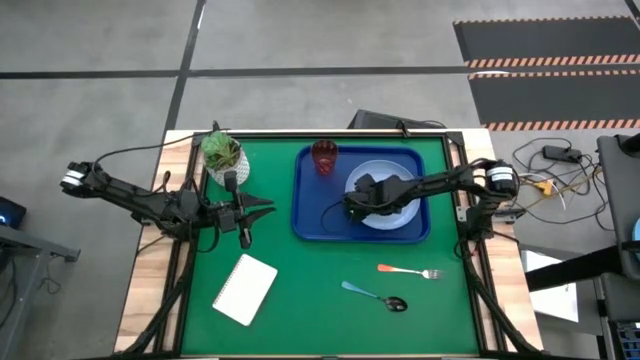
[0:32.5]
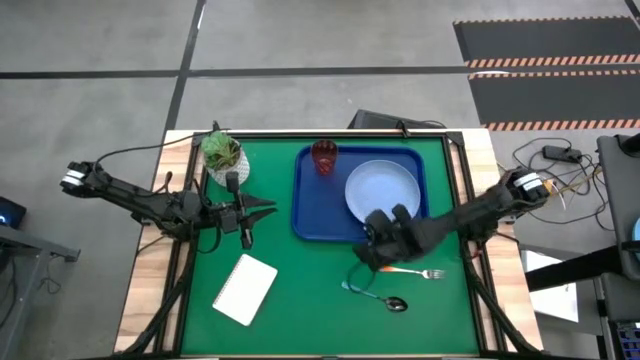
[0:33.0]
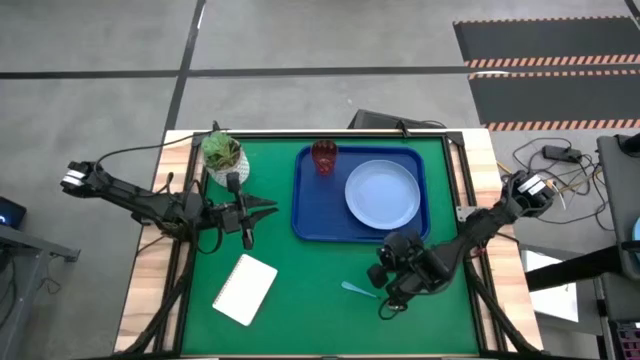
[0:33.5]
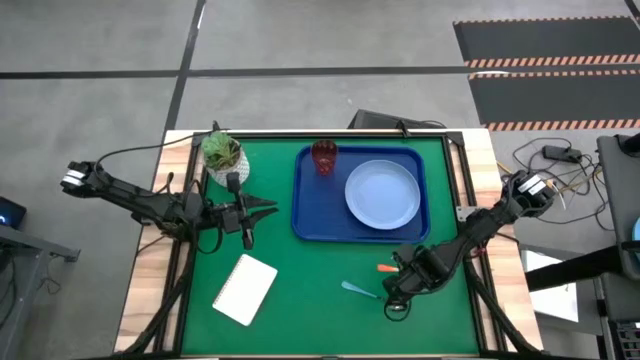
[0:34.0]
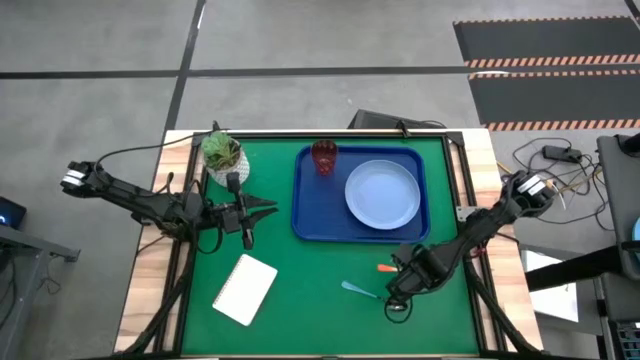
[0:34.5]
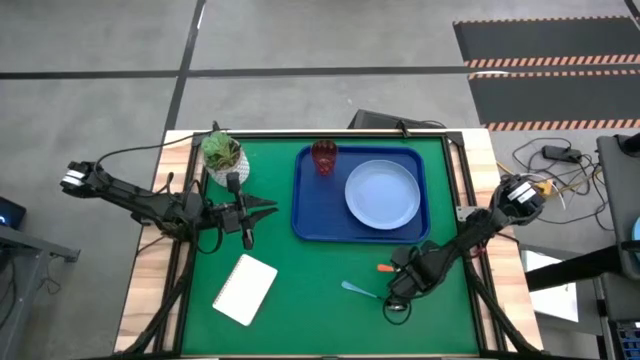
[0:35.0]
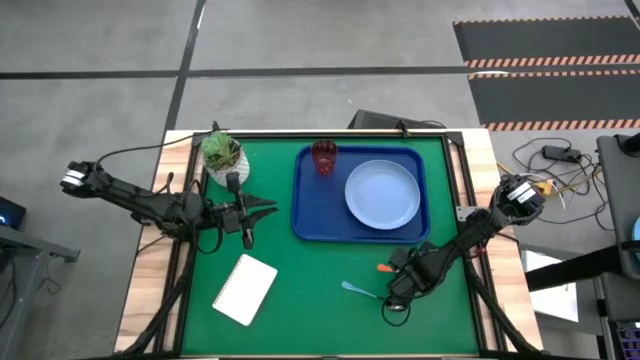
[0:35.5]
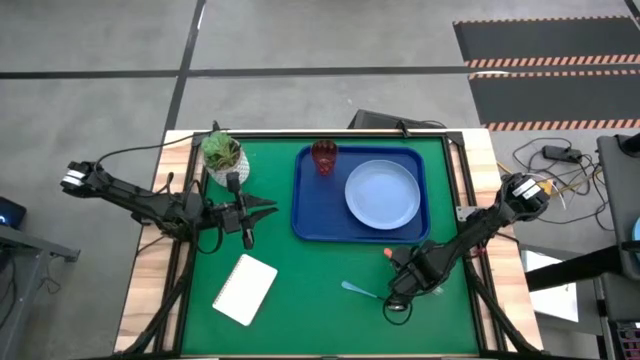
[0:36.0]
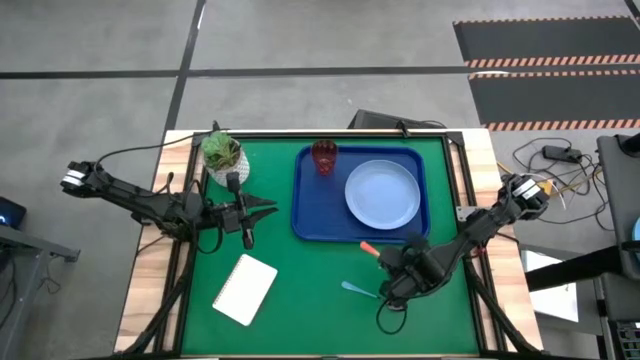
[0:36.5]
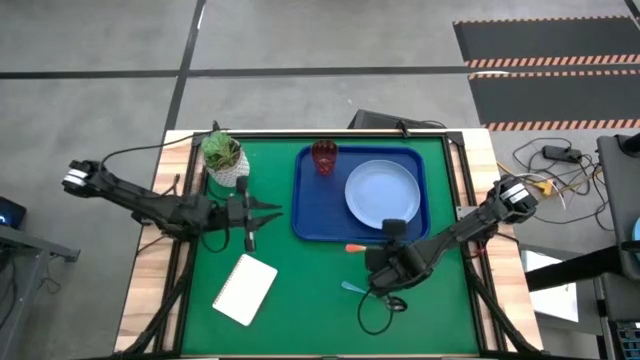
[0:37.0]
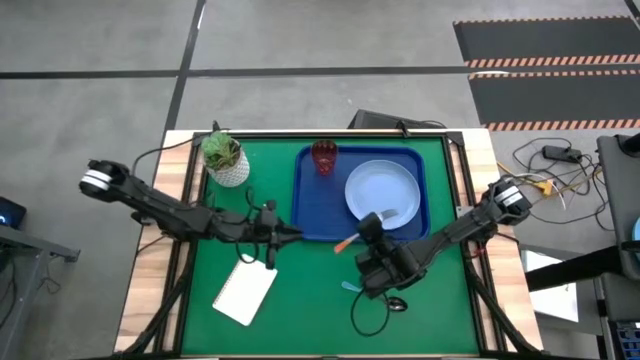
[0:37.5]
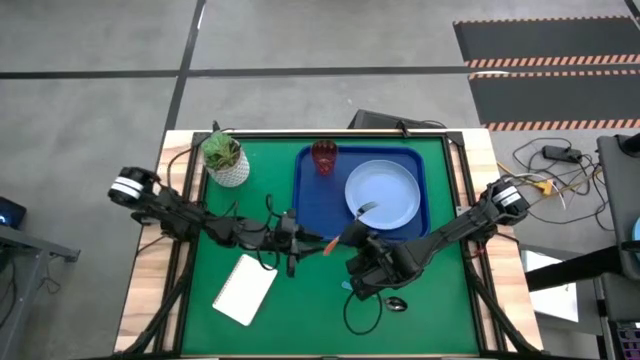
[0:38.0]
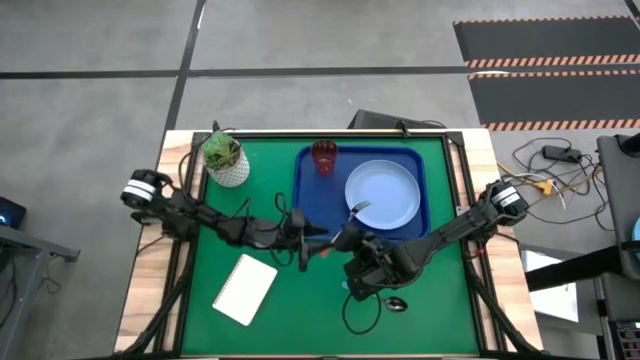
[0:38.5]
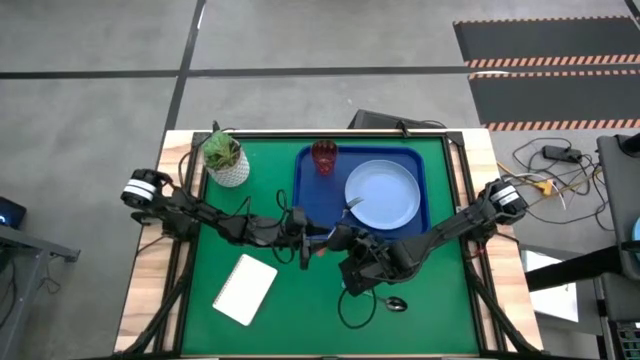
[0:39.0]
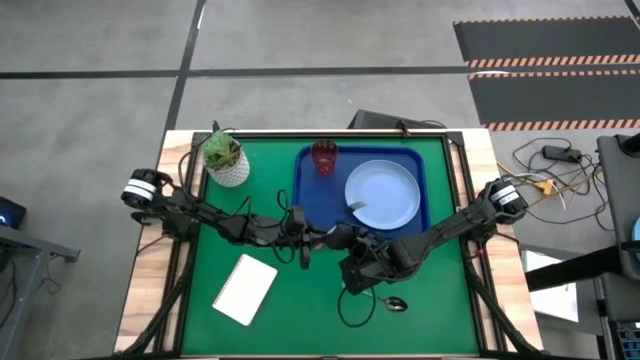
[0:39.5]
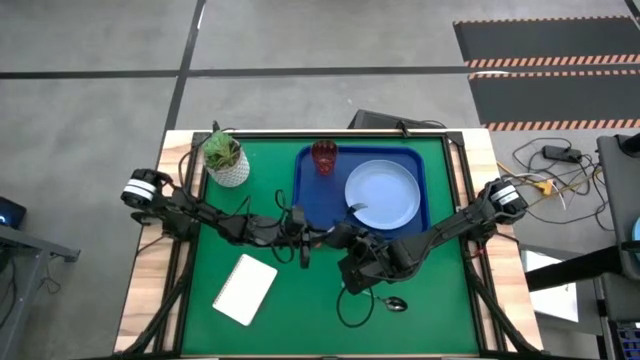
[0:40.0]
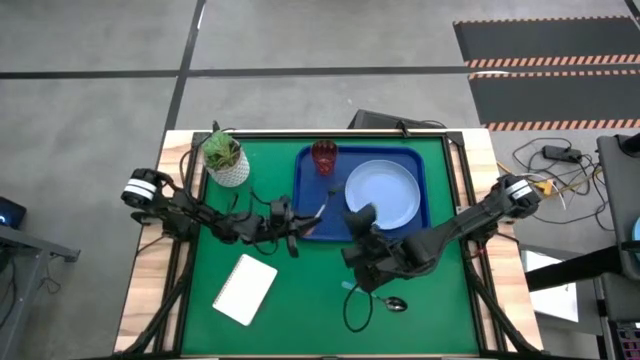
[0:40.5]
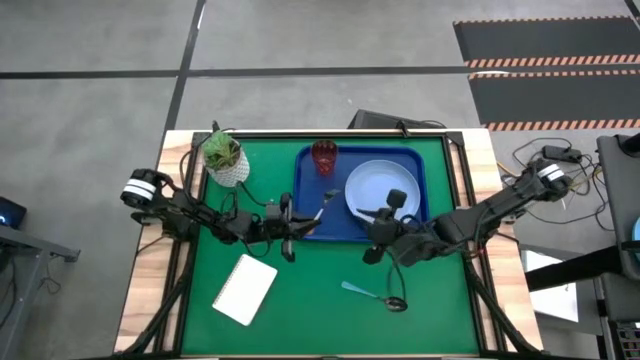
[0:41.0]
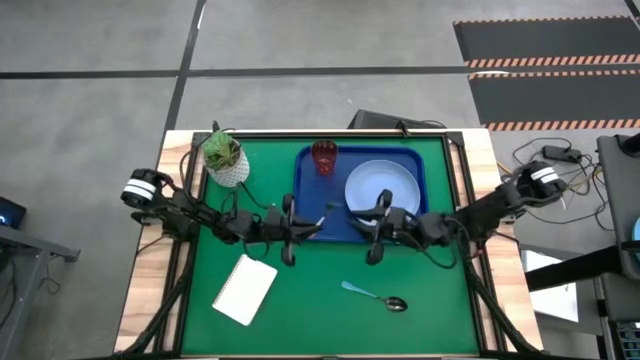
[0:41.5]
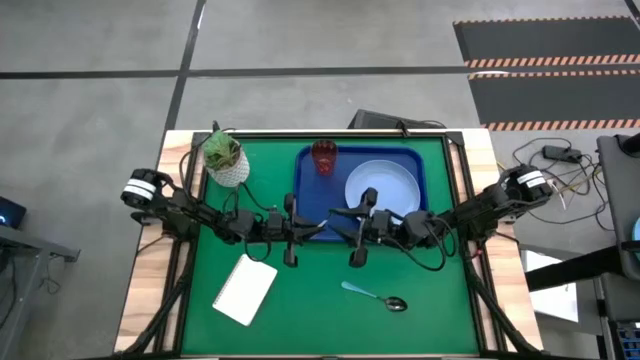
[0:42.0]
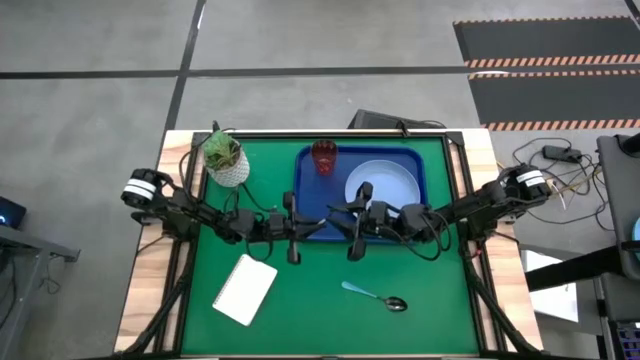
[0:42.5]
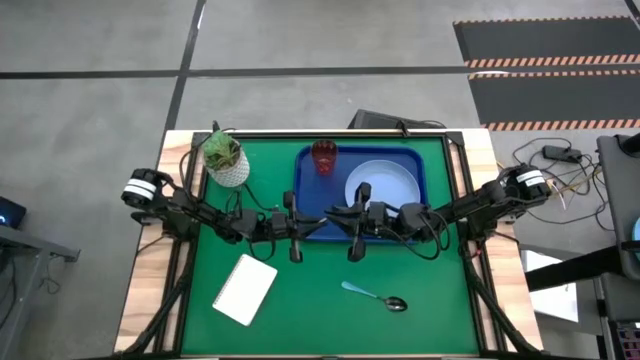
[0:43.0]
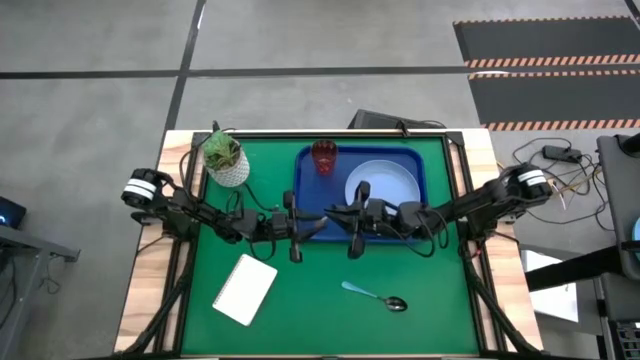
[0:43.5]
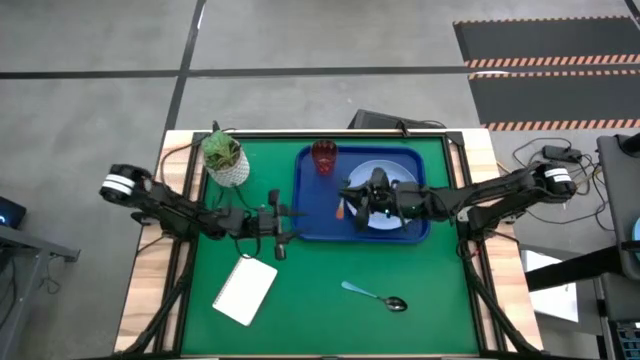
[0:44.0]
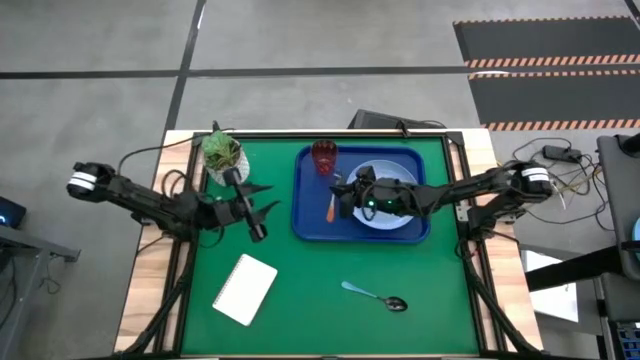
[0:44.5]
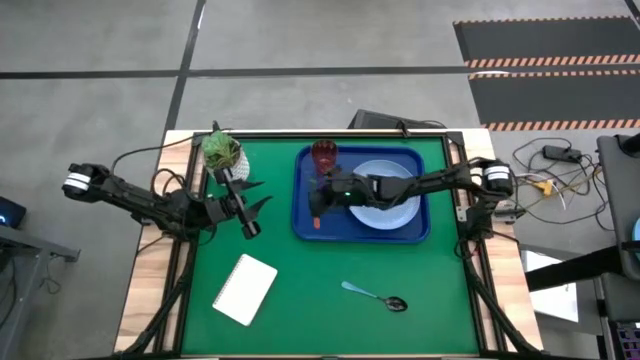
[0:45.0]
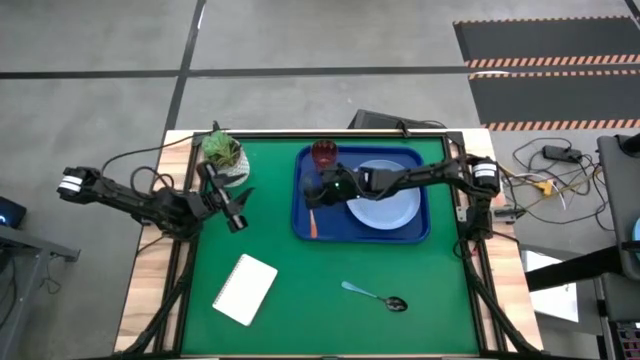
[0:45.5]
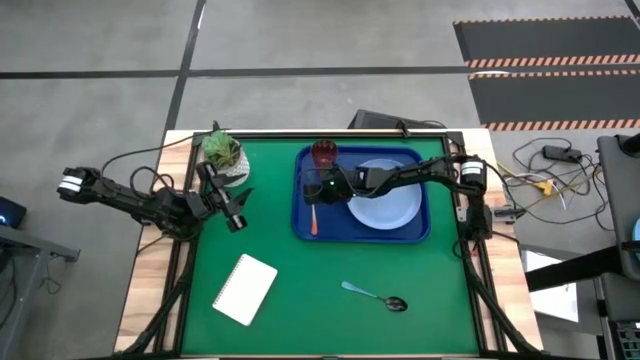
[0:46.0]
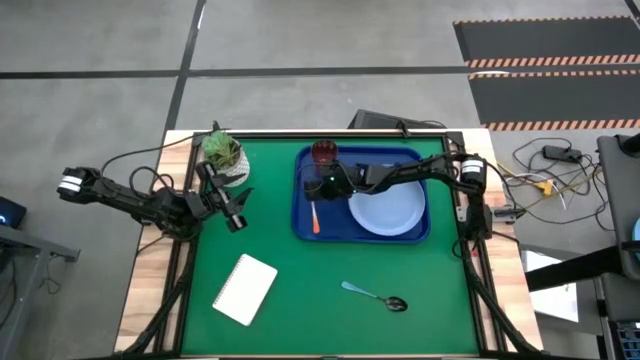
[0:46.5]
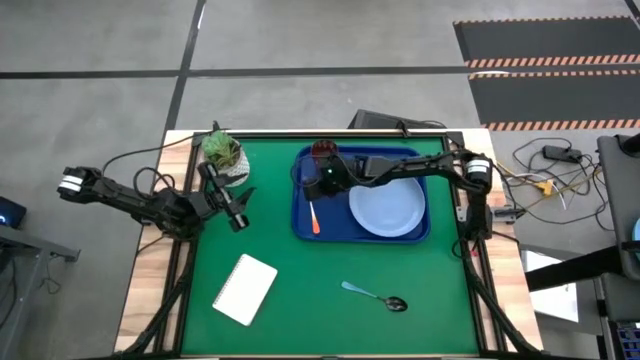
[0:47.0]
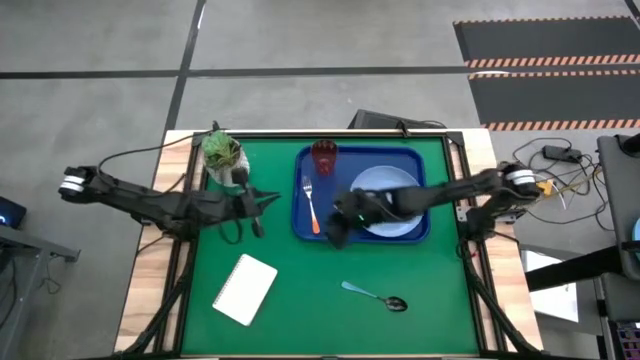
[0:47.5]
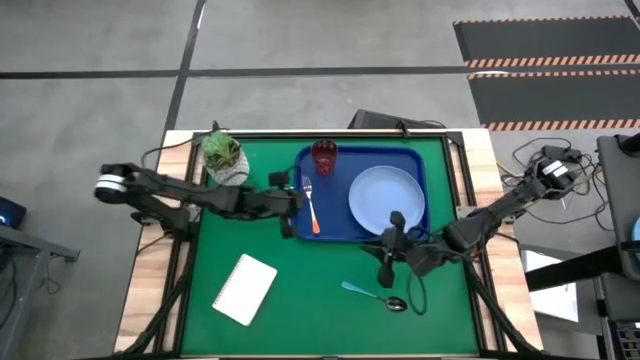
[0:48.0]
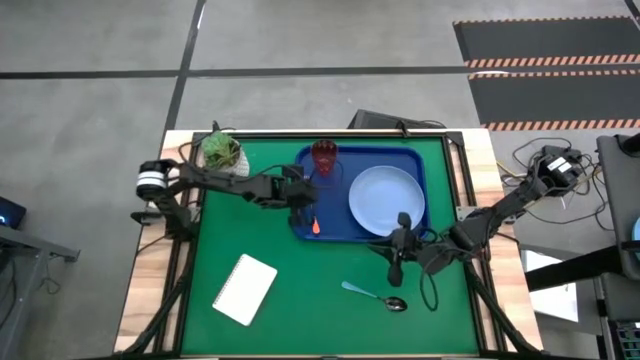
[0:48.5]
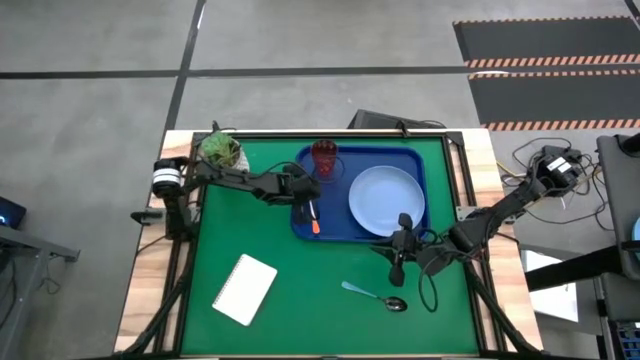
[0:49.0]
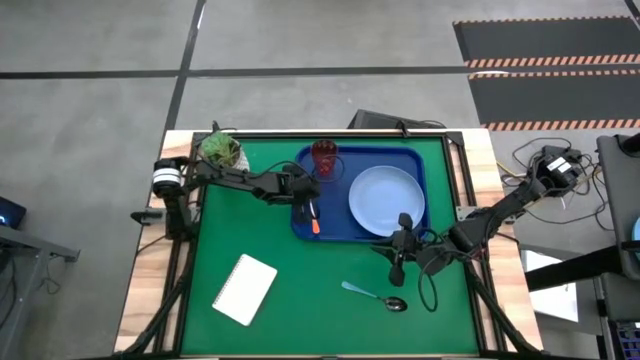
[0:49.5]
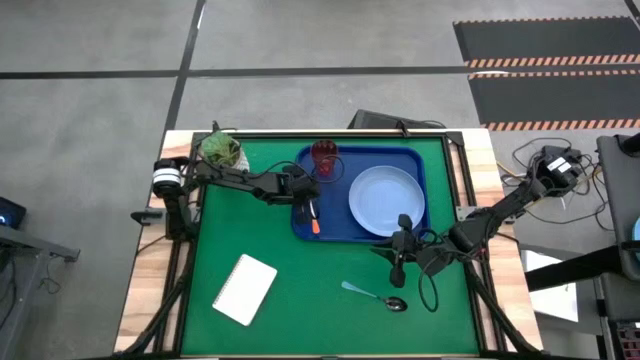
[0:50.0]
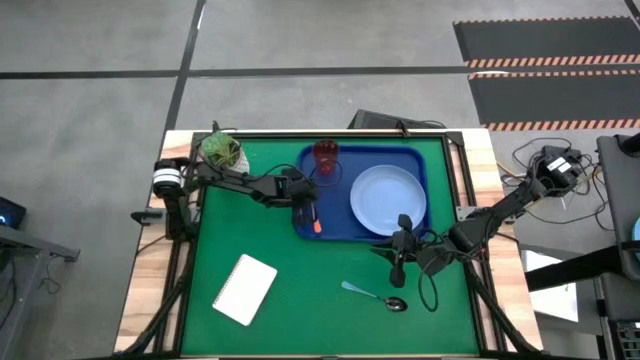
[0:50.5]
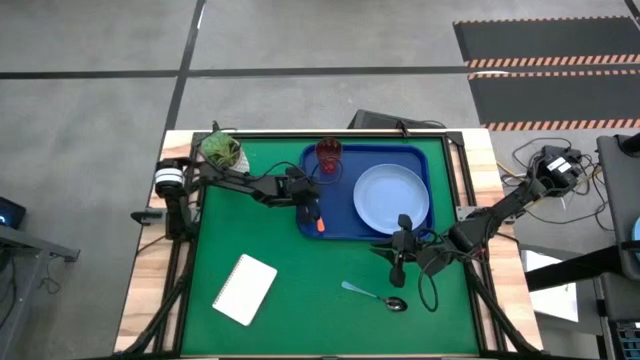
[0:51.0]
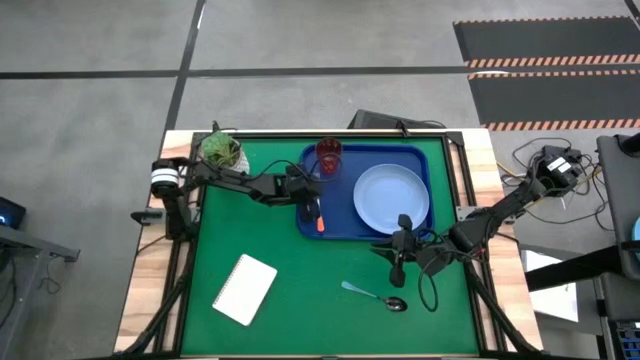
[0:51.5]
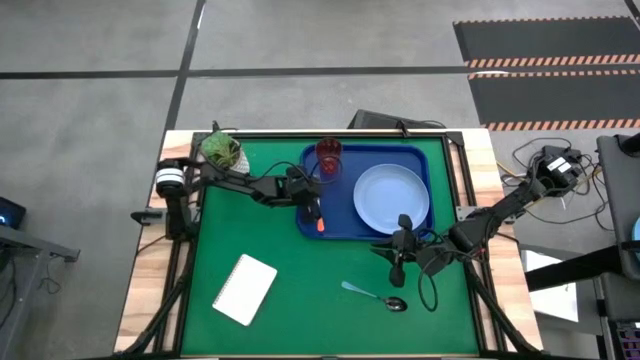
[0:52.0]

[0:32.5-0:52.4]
Task: Pick and place plate/cup/fork/spoon on tray
Put the orange fork on the blue tray to the left of the blue plate

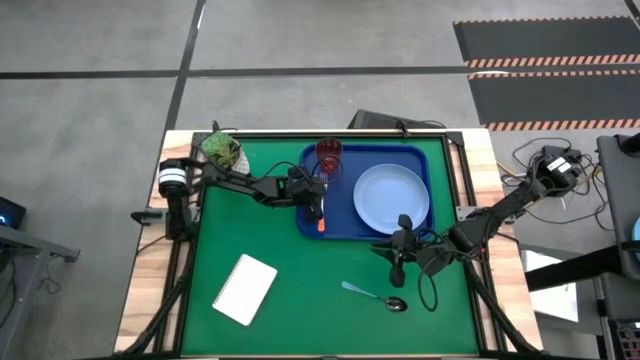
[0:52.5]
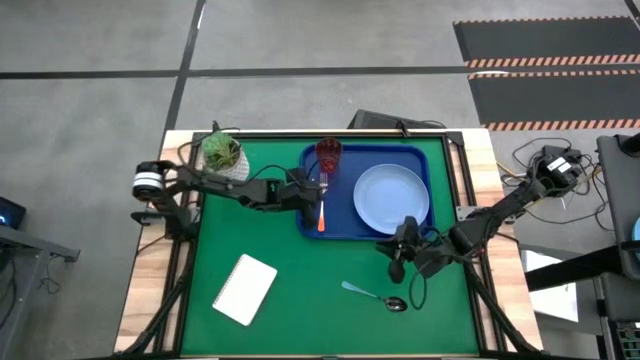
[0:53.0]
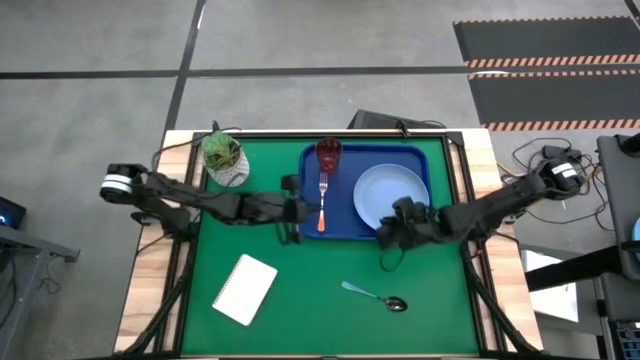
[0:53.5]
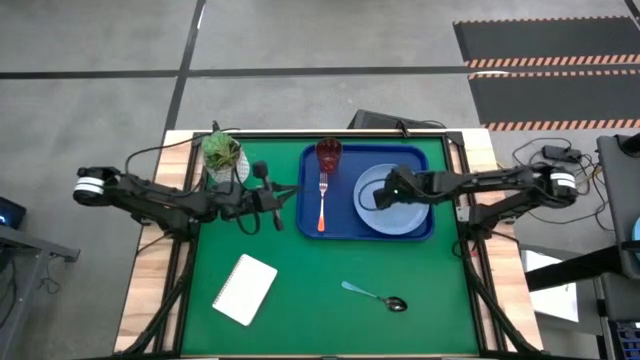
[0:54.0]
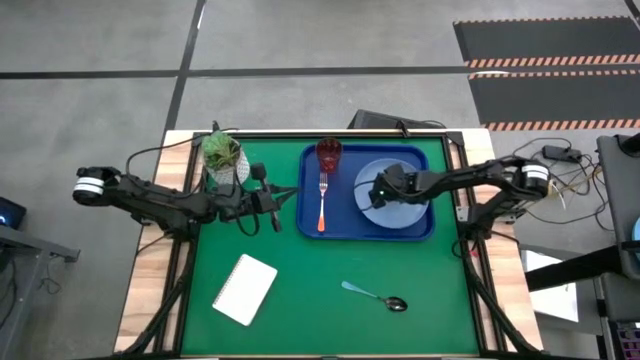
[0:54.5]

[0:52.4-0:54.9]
Adjust the blue plate on the blue tray
